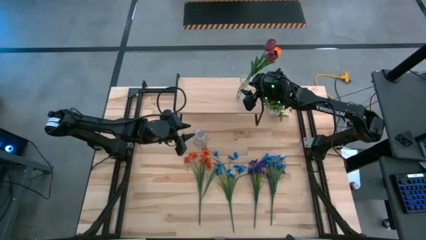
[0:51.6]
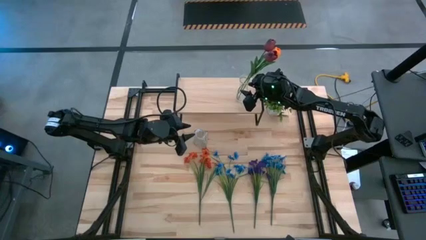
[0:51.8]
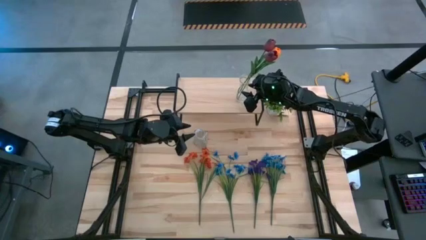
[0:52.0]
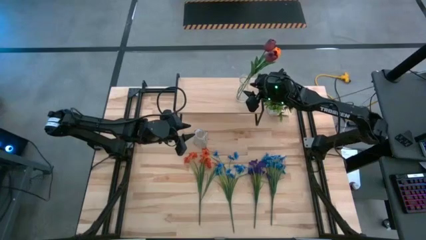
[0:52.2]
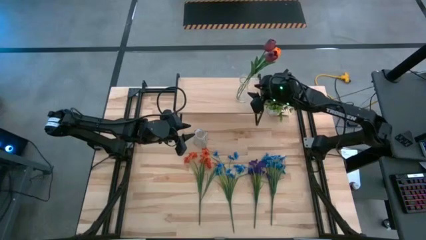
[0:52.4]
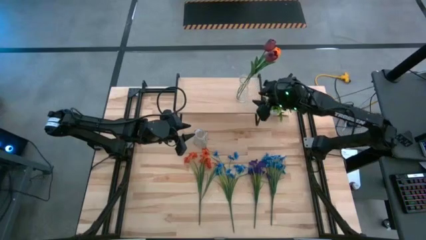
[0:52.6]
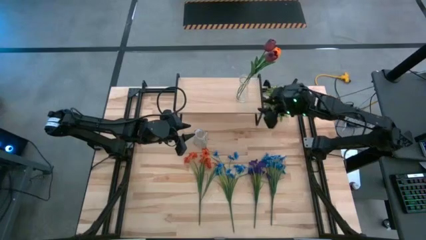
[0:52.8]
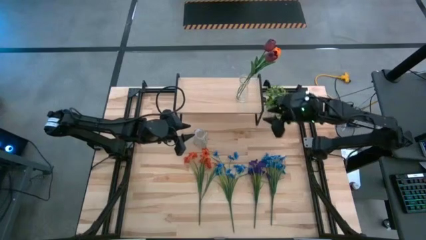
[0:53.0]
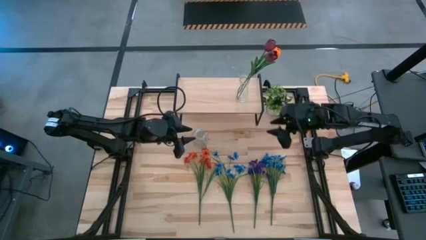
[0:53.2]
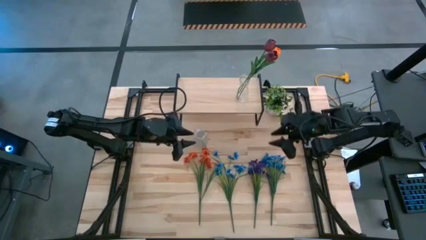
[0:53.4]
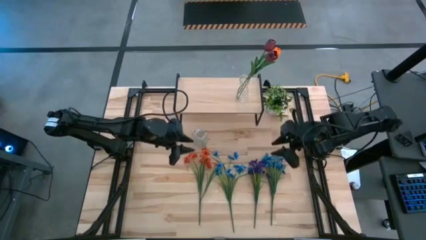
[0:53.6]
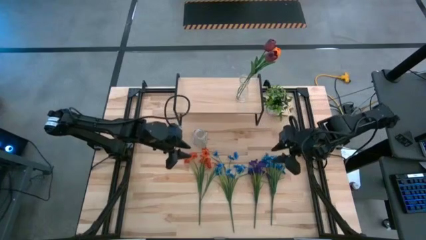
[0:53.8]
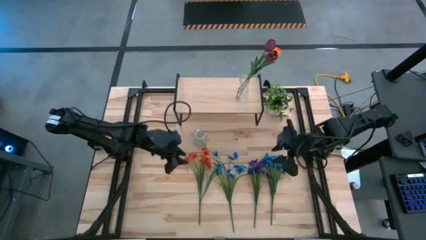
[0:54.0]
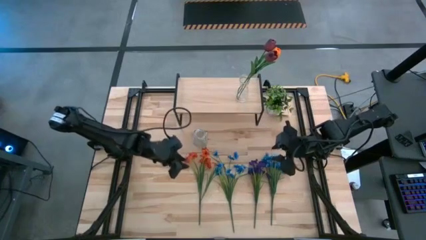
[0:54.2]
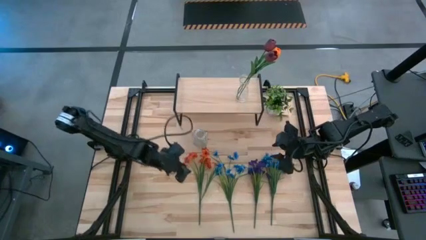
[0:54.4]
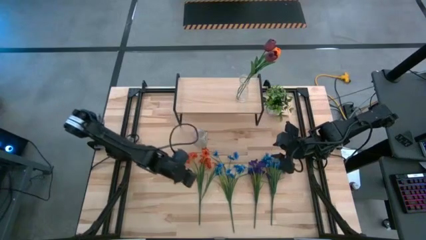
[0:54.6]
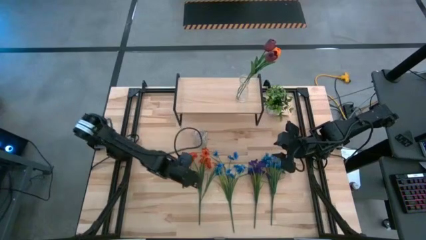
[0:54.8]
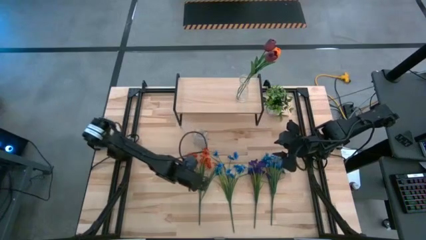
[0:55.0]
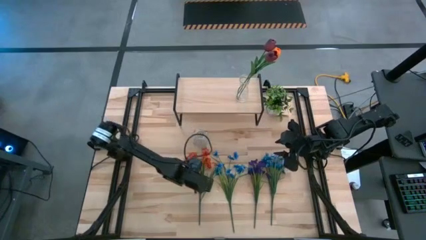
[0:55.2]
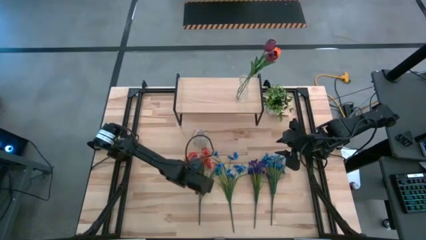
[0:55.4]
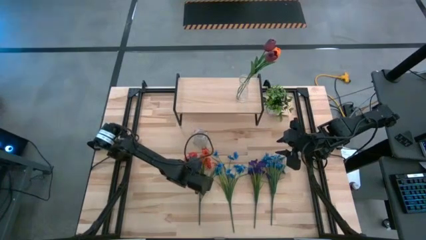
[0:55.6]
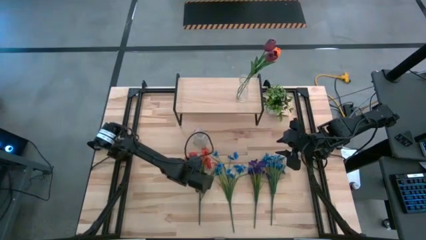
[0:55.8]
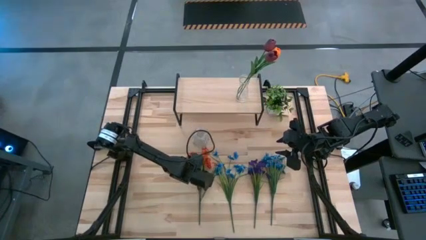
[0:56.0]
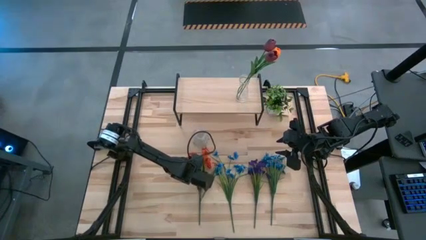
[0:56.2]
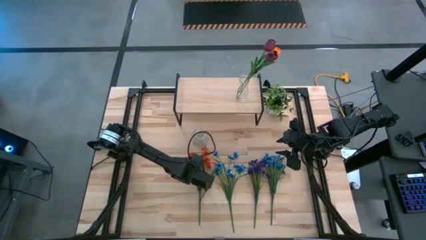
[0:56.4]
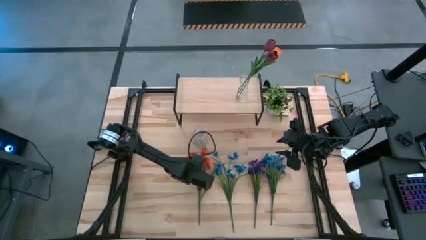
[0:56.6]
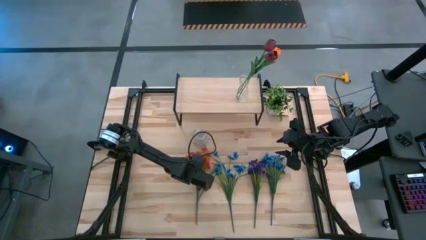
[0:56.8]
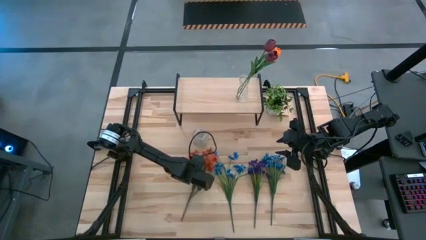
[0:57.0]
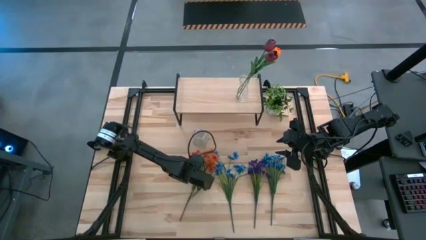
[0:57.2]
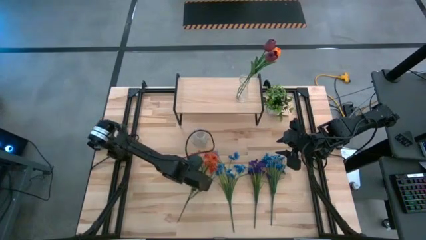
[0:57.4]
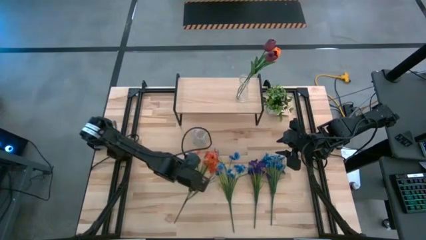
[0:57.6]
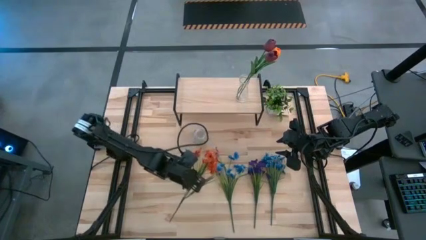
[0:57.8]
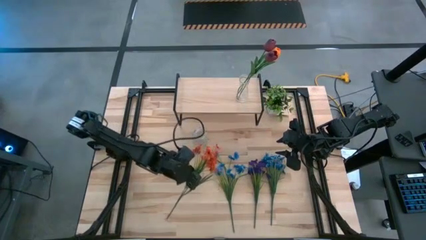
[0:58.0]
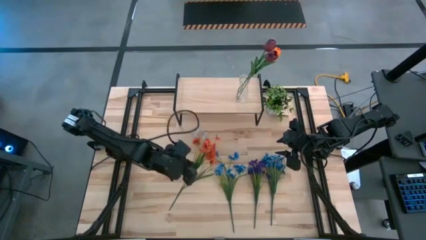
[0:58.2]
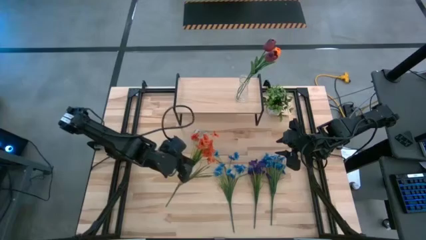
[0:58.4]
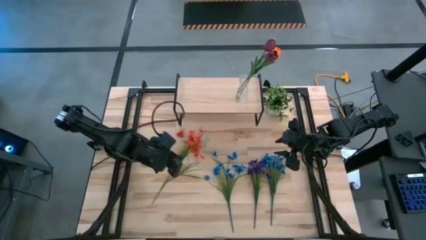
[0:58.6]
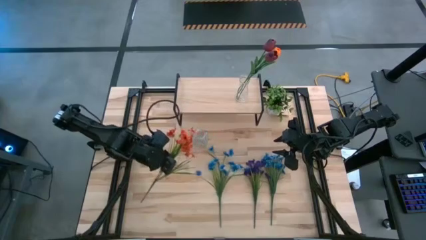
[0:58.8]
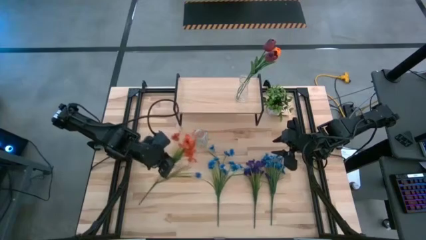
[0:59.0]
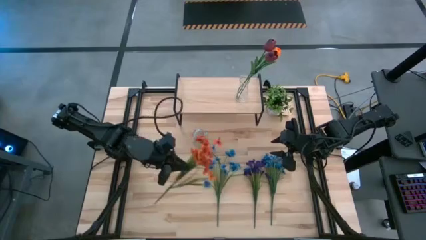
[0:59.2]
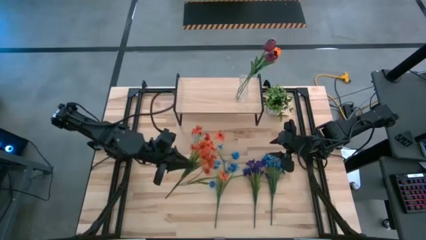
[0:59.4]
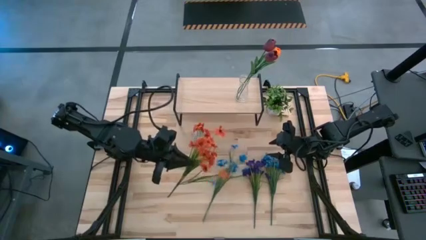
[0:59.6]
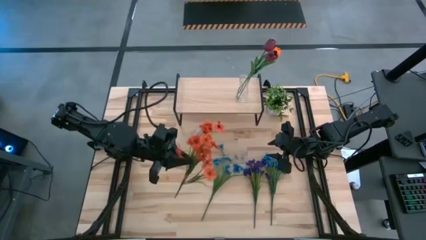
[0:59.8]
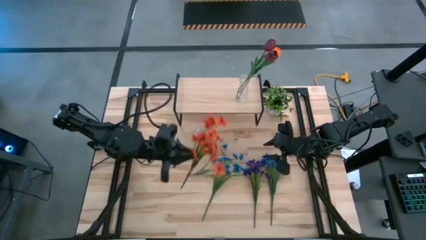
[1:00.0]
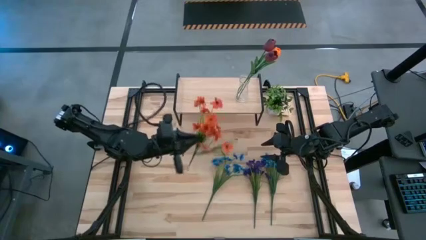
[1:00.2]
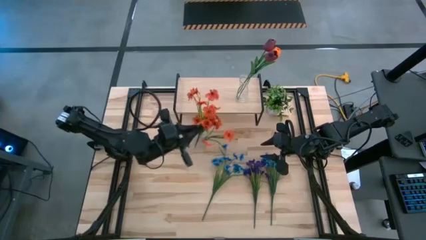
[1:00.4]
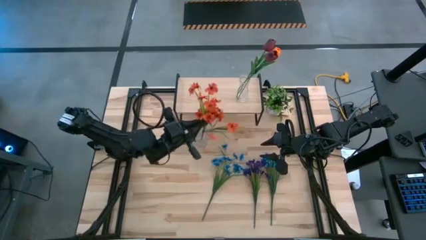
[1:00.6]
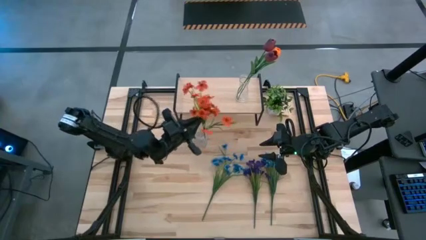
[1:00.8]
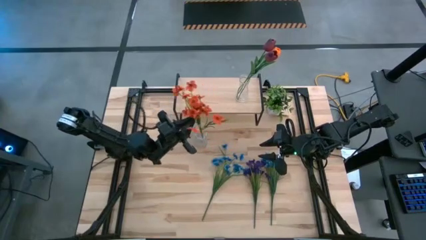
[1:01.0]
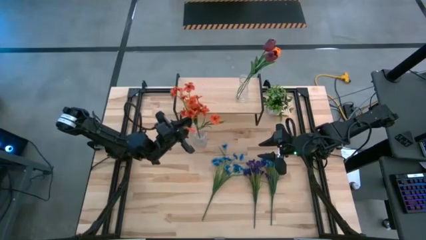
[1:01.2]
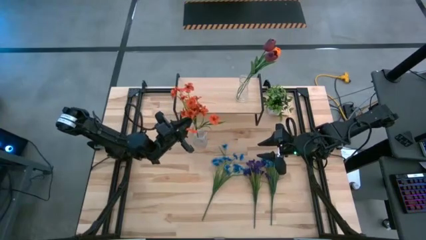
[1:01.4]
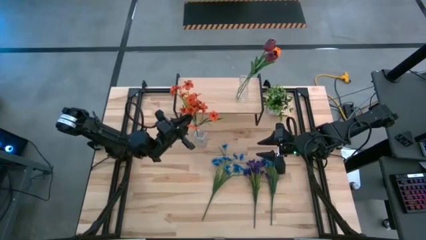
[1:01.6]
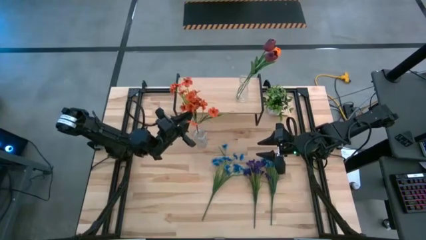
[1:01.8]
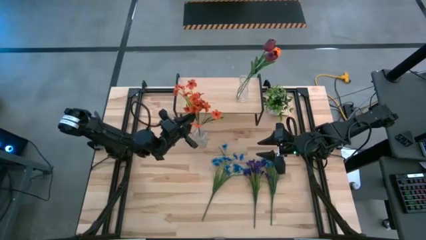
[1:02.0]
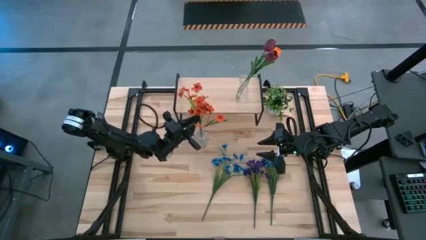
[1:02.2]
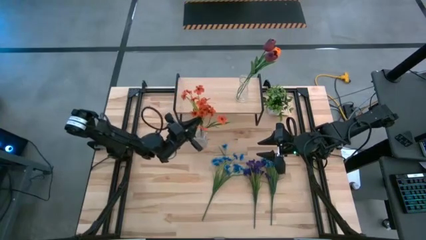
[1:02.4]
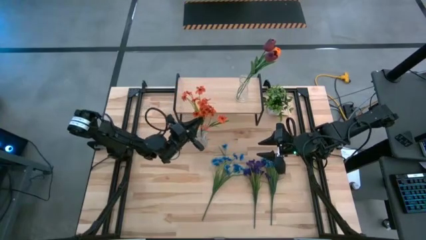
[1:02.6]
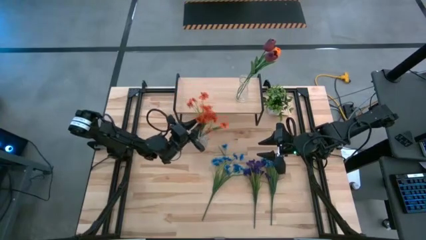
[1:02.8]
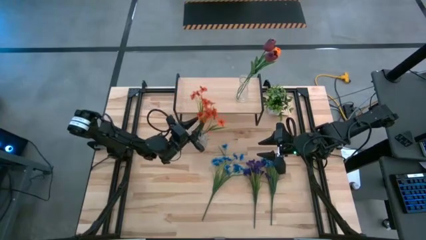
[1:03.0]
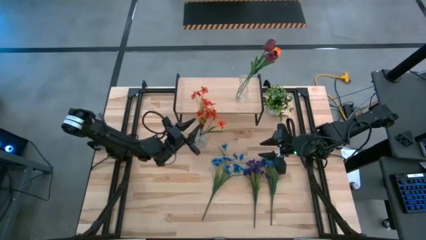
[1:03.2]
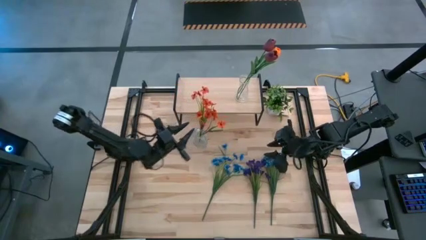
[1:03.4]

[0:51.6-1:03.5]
Task: Pick and place flowers into a vace then onto a shelf
Put the orange flowers into the transparent vase
